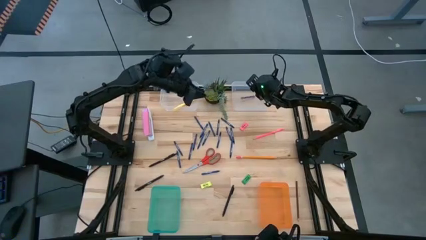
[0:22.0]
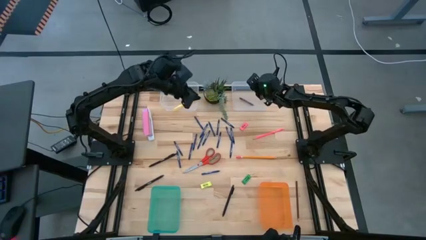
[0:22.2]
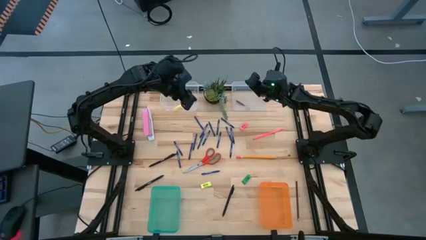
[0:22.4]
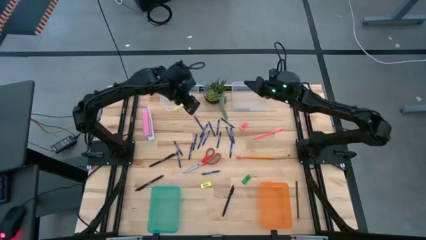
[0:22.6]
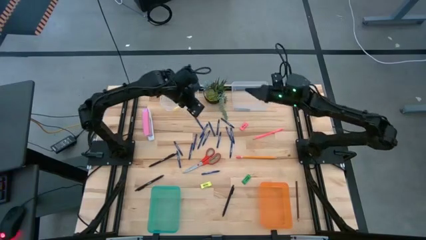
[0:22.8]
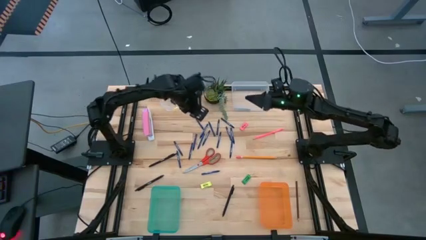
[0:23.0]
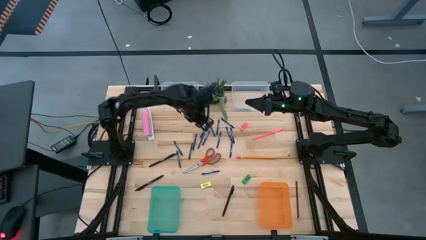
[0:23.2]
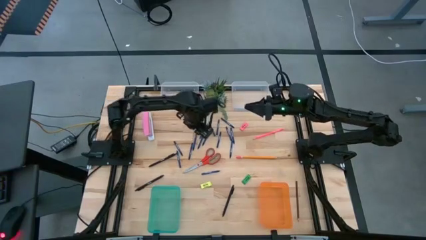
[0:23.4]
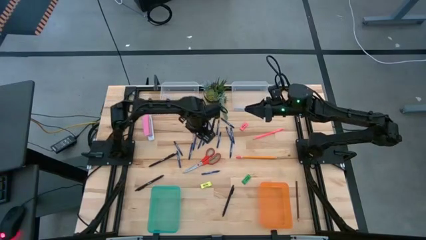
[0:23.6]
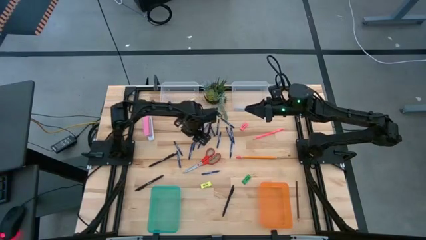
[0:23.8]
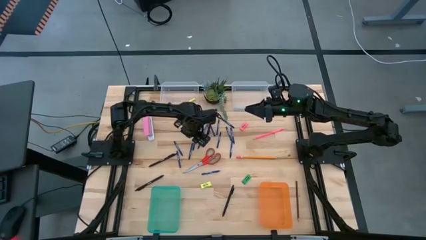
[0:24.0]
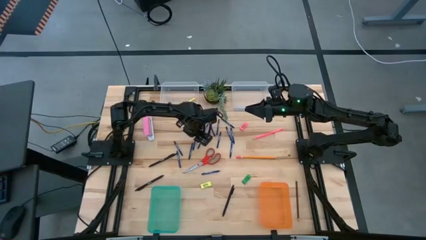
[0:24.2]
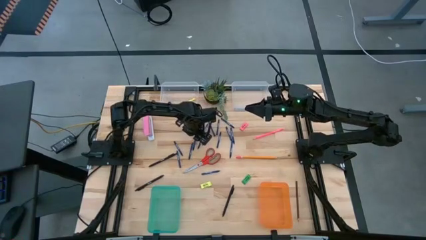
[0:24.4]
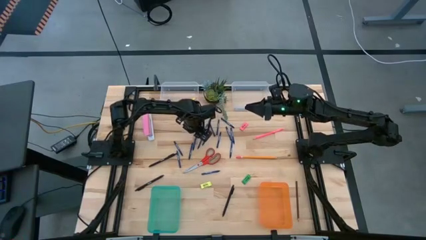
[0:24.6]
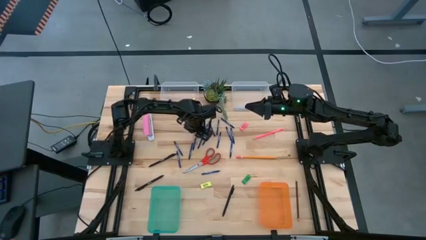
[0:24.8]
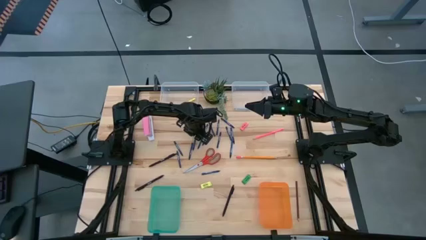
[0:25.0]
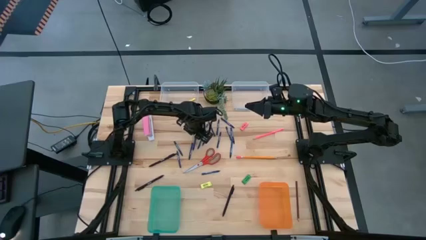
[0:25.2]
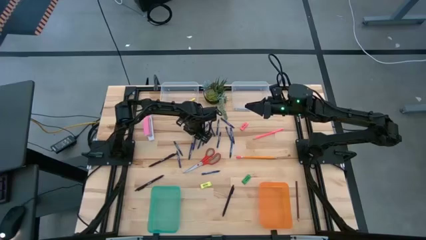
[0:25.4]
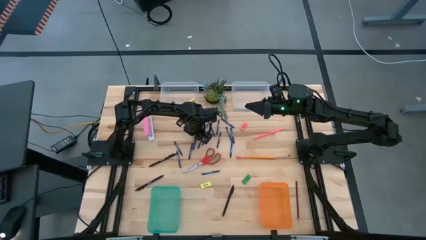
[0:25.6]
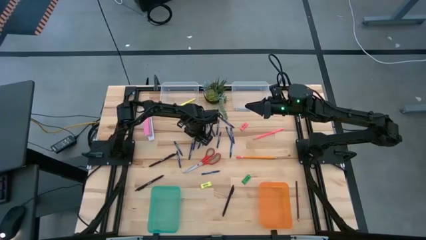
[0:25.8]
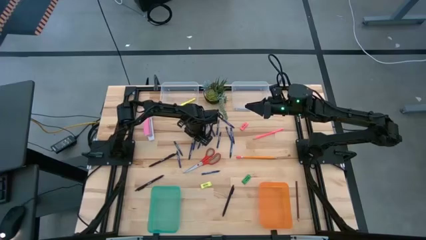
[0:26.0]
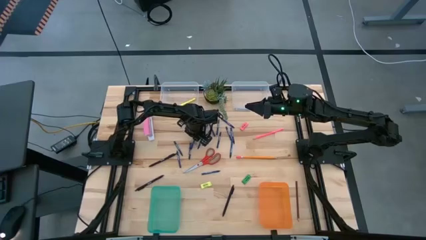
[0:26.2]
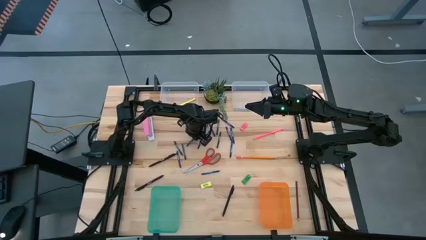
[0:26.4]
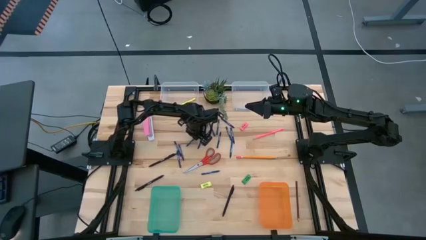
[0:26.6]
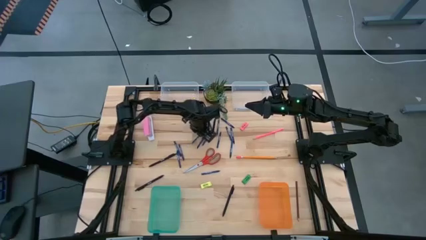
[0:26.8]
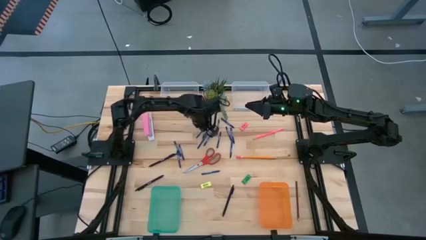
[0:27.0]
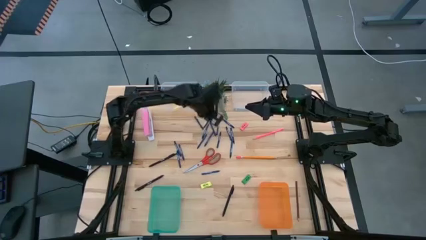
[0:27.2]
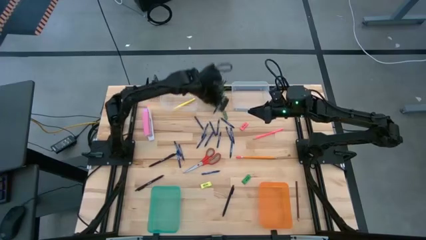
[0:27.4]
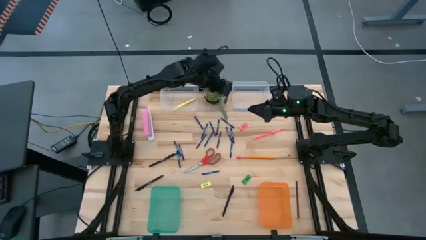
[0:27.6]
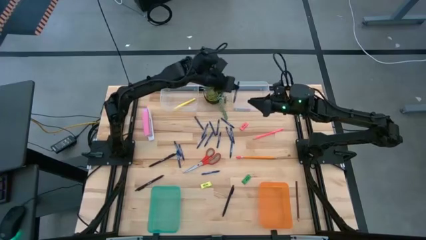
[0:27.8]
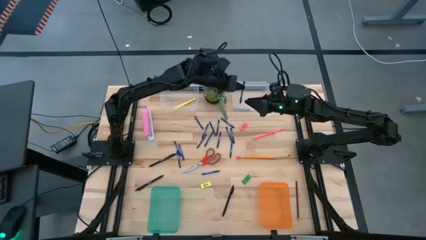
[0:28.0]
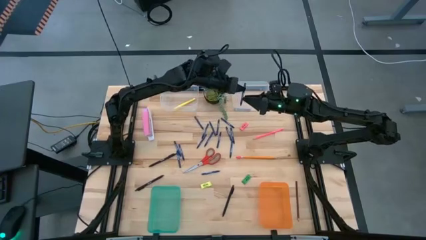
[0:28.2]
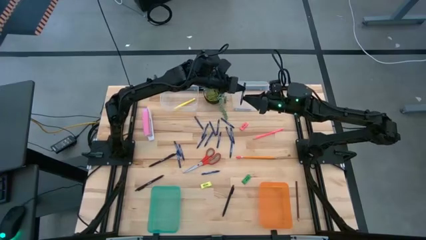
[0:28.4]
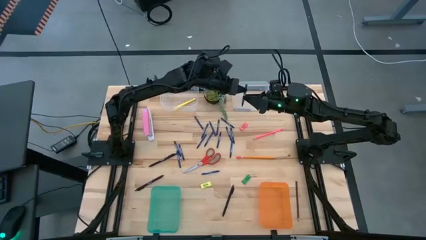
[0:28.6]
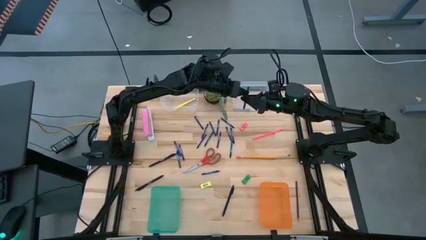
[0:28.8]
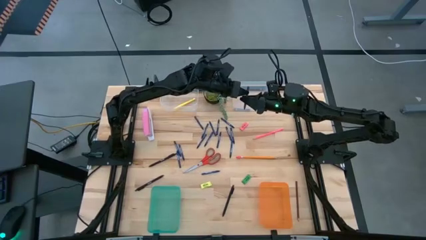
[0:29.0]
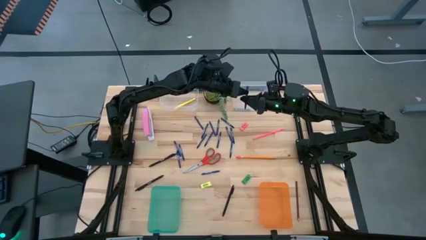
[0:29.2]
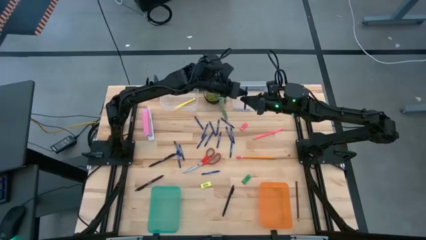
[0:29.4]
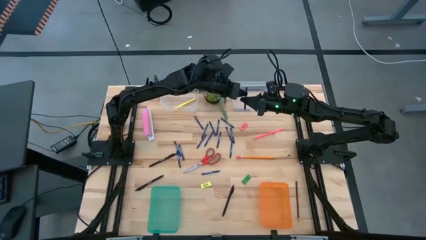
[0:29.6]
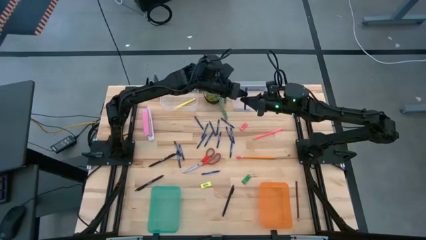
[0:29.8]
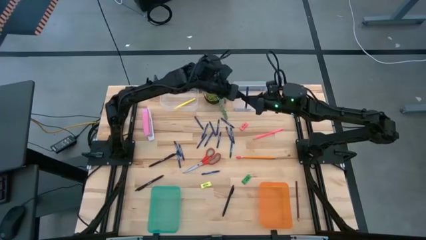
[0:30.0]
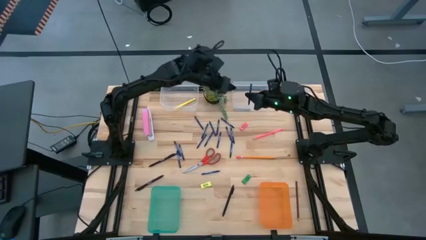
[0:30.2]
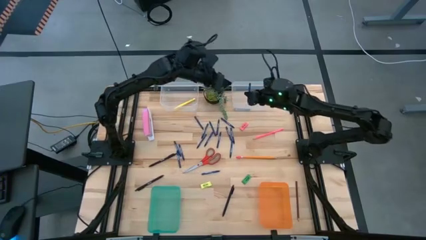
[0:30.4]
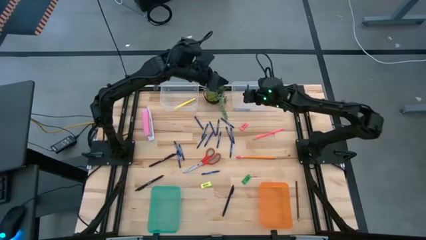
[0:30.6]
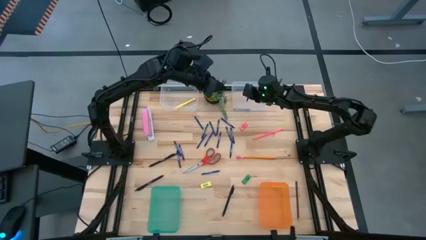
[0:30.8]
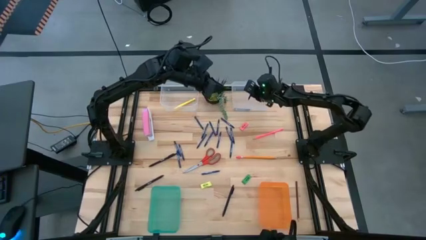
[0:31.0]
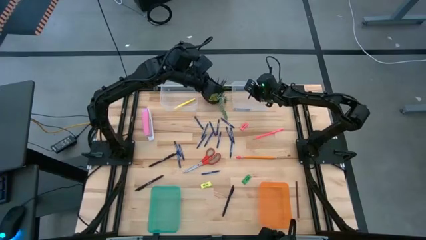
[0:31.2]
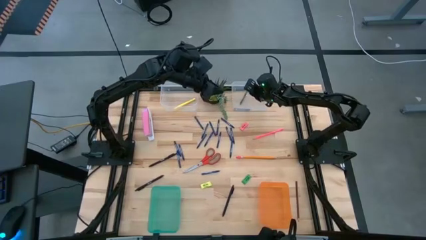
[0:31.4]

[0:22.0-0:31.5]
Task: Sort crayons/erasers/pens/pencils in bins
Put the blue crayon into the right transparent bin

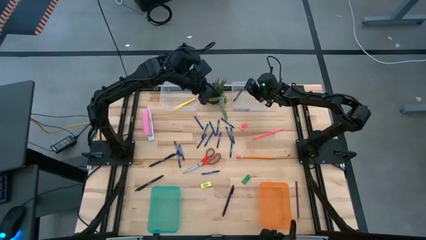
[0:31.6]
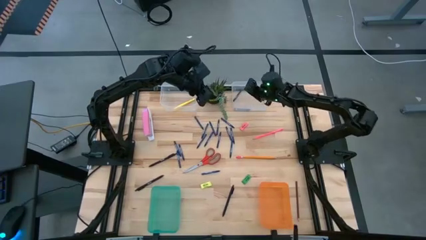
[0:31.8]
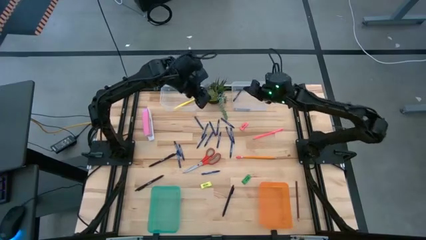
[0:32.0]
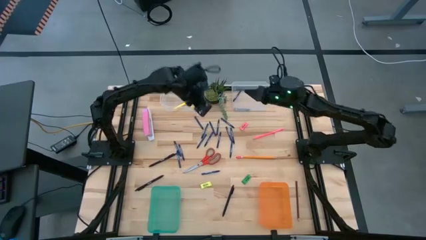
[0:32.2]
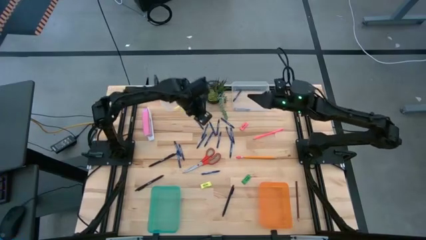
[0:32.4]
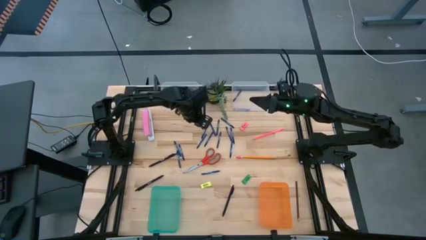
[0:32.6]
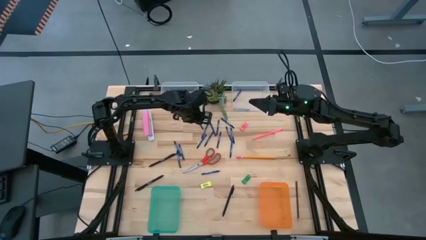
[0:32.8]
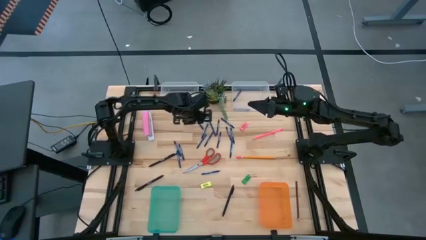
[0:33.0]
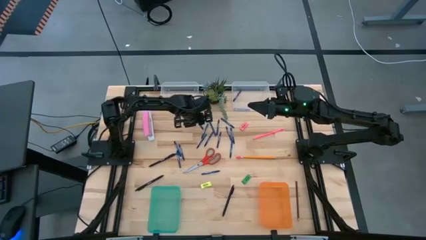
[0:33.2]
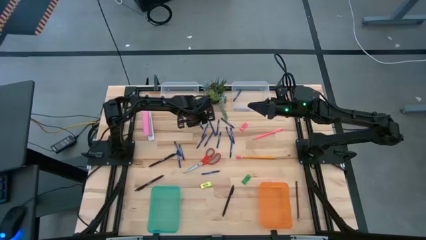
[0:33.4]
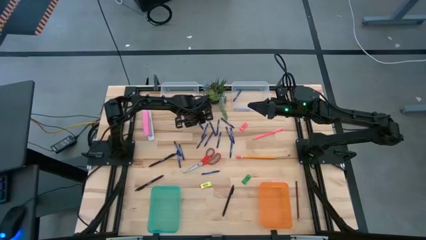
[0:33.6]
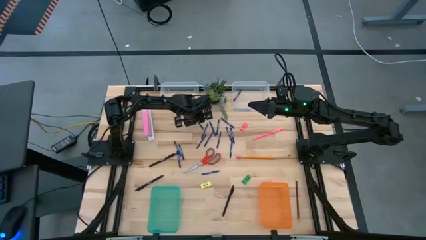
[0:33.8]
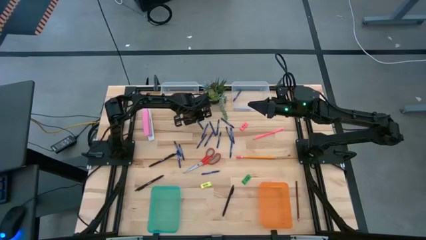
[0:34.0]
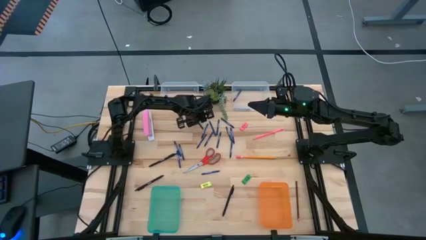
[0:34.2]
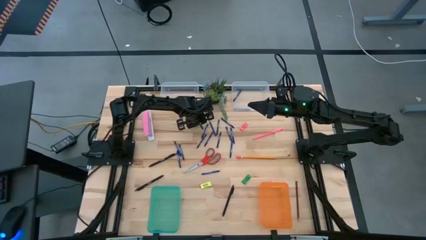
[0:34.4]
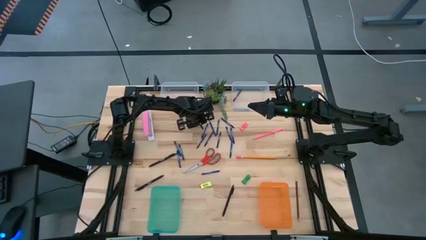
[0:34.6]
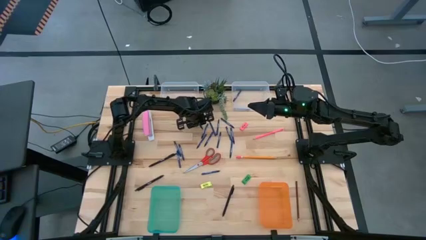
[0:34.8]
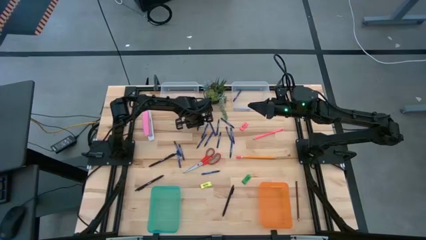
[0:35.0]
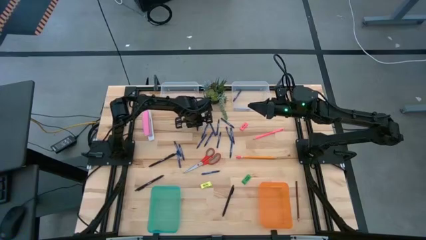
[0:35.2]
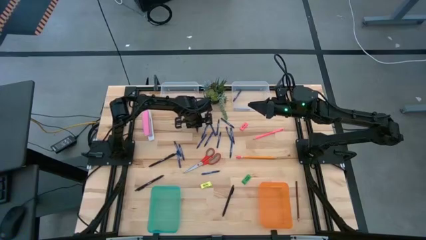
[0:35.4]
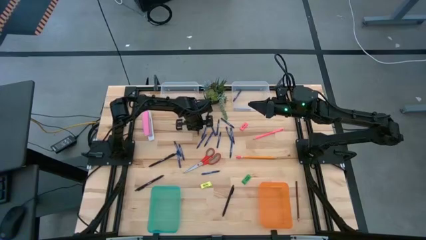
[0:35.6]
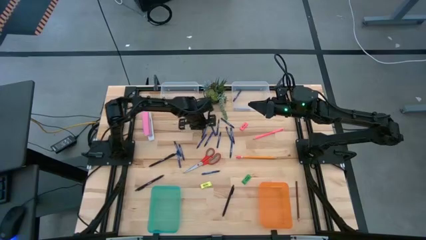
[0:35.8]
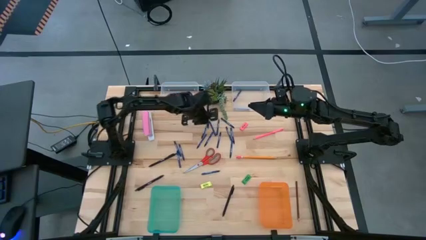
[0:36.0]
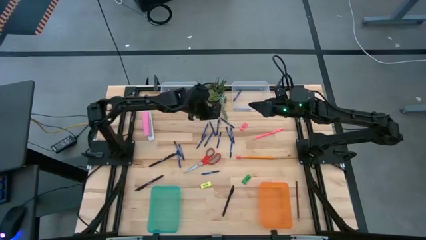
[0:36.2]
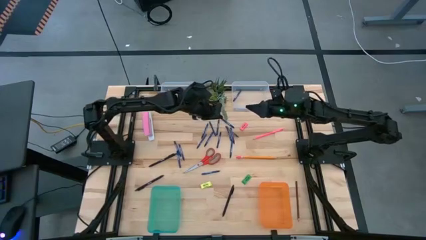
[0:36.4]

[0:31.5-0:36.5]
Put the blue crayon into the right transparent bin

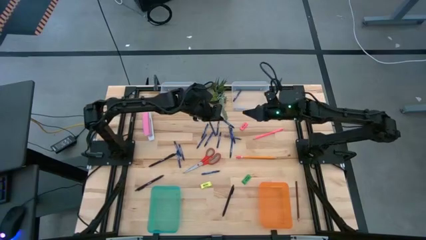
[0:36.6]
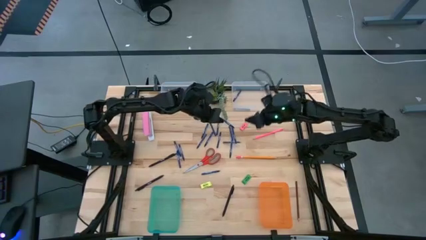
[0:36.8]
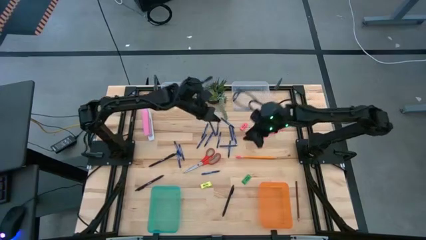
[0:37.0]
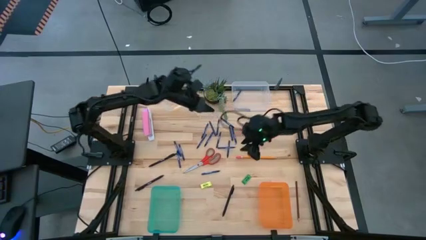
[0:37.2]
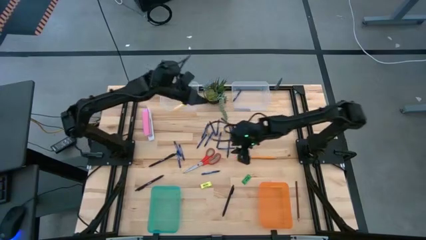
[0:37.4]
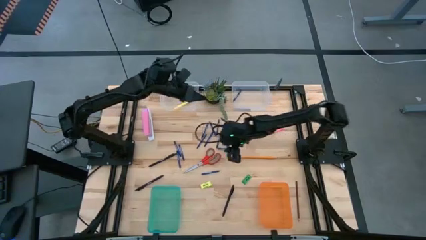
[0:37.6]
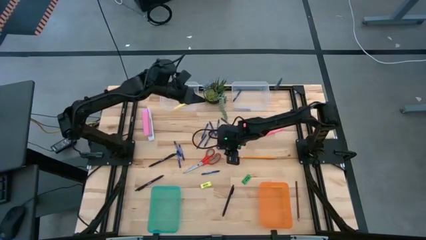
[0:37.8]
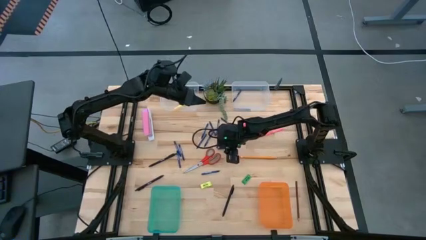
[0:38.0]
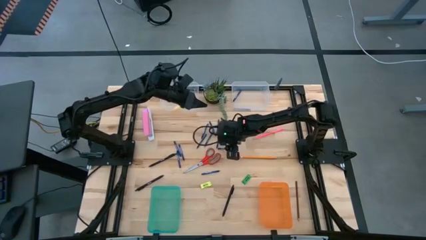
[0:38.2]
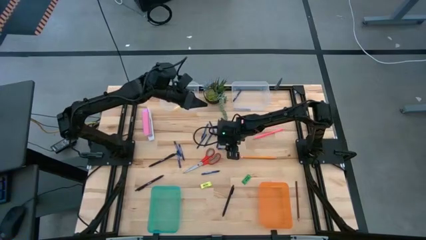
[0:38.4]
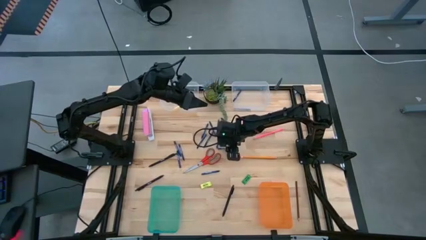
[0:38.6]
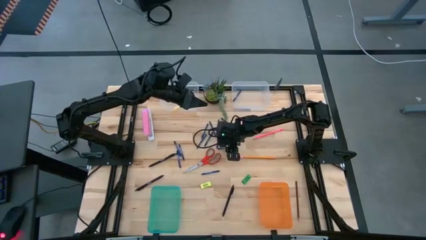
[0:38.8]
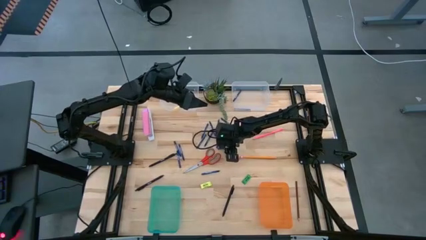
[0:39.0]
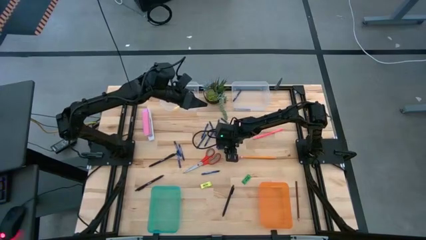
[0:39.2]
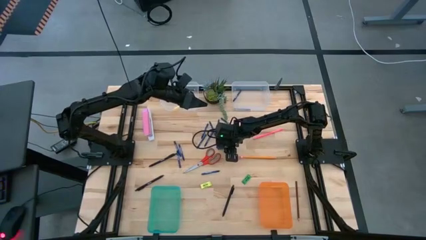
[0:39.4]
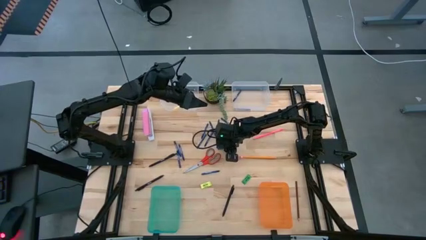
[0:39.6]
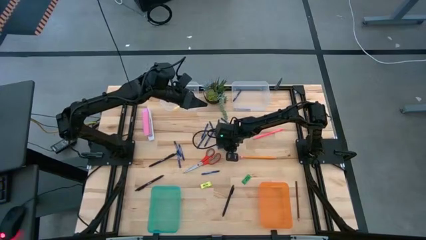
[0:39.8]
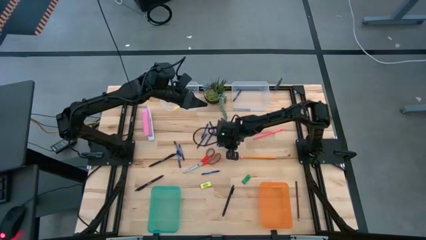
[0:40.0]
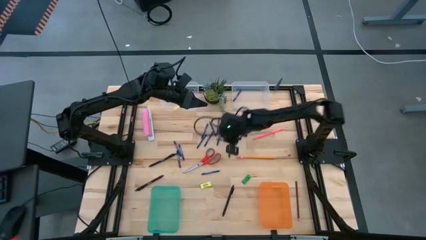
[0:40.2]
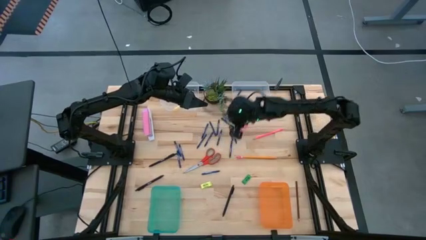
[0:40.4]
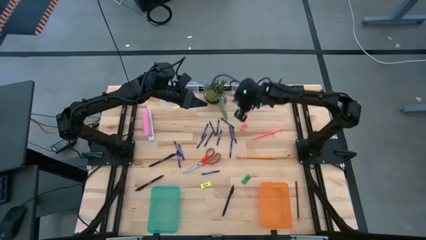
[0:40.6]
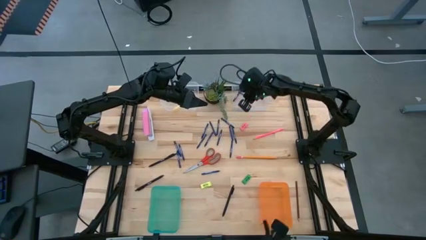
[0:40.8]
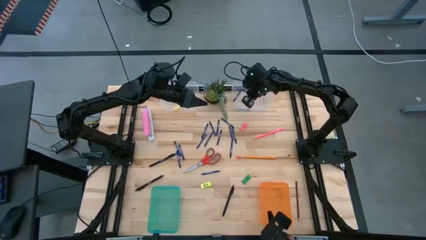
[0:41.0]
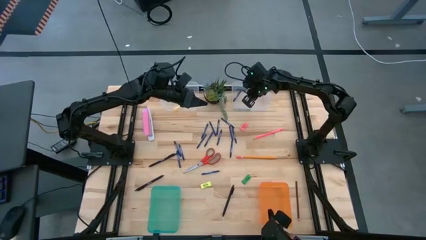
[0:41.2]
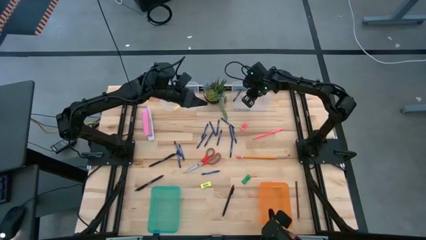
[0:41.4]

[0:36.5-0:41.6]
Put the blue crayon into the right transparent bin
